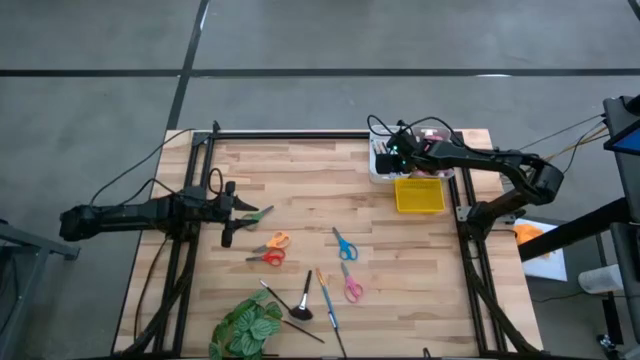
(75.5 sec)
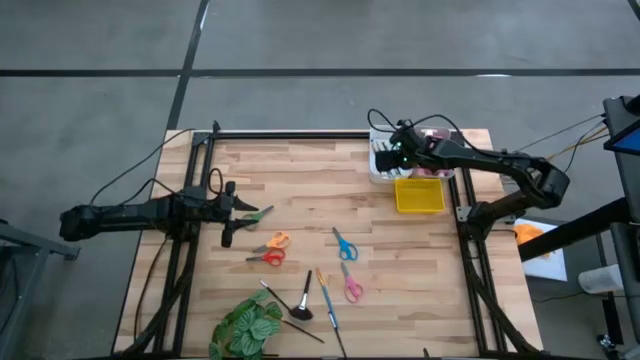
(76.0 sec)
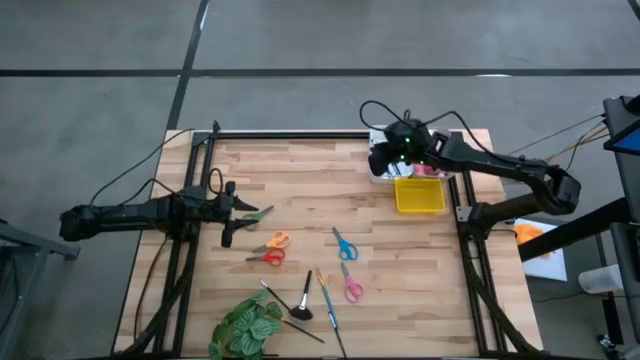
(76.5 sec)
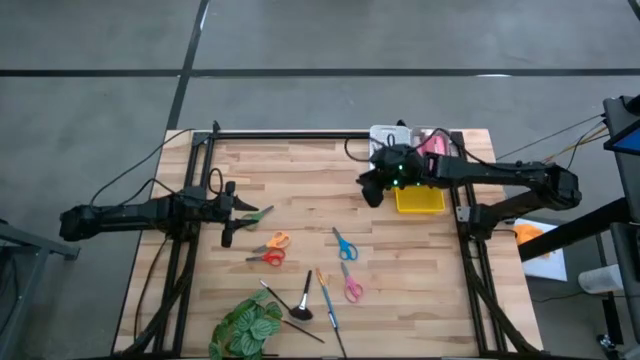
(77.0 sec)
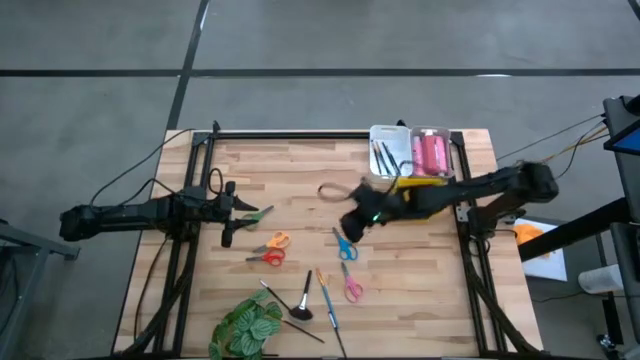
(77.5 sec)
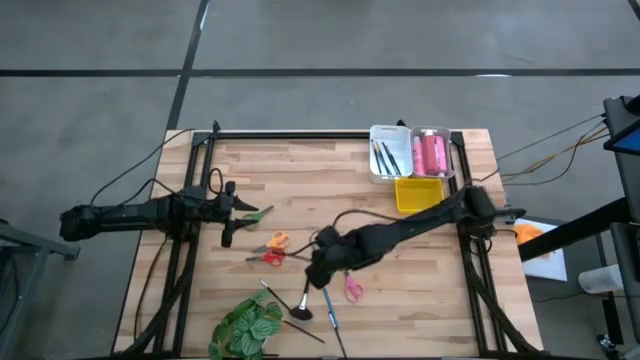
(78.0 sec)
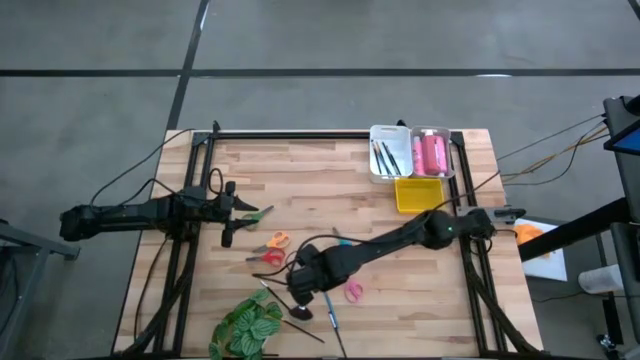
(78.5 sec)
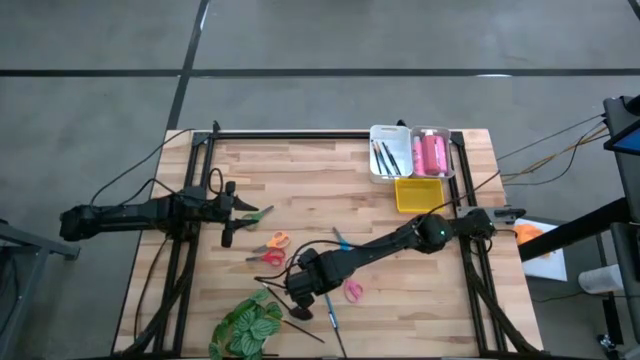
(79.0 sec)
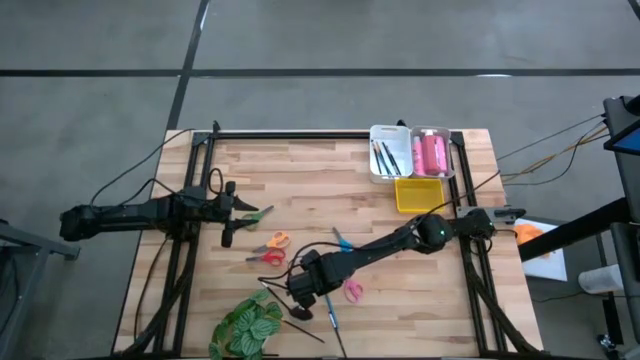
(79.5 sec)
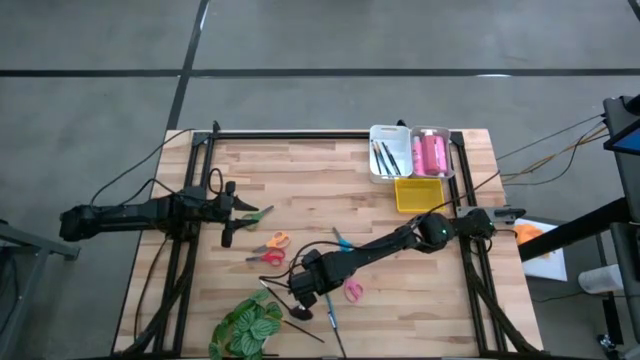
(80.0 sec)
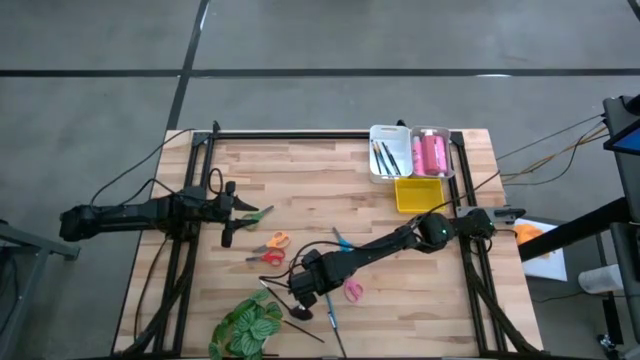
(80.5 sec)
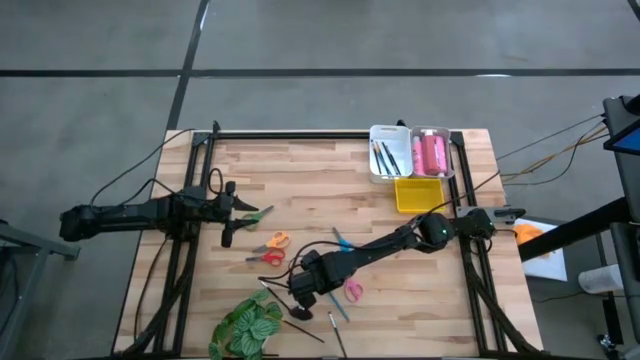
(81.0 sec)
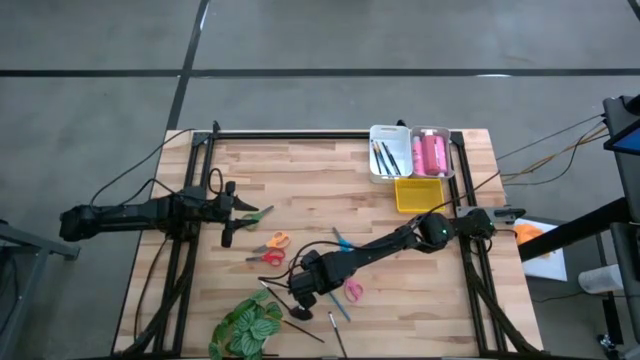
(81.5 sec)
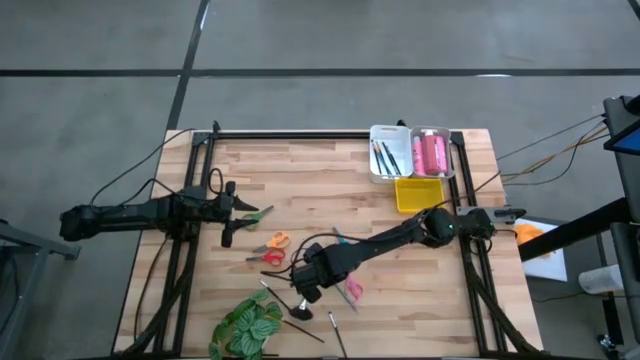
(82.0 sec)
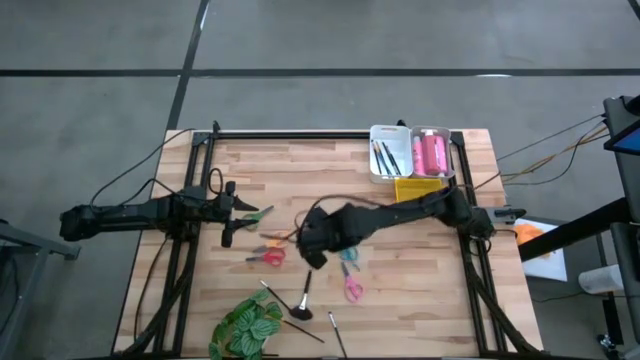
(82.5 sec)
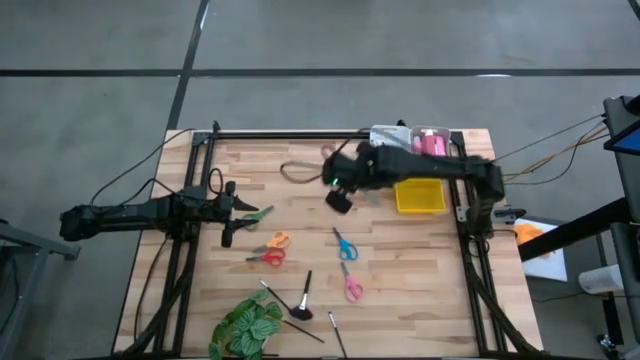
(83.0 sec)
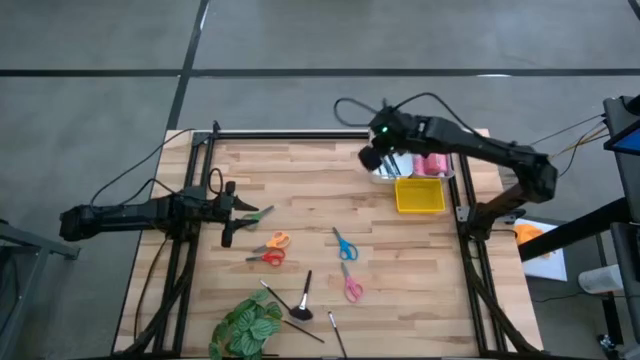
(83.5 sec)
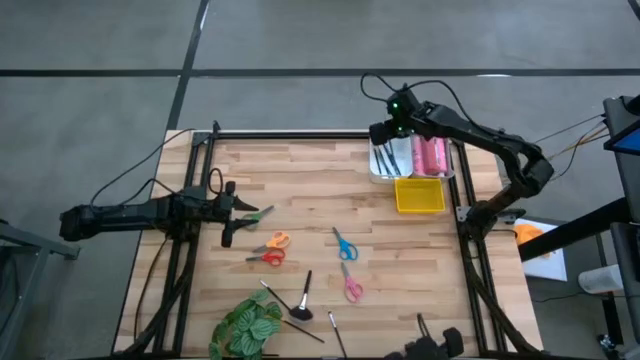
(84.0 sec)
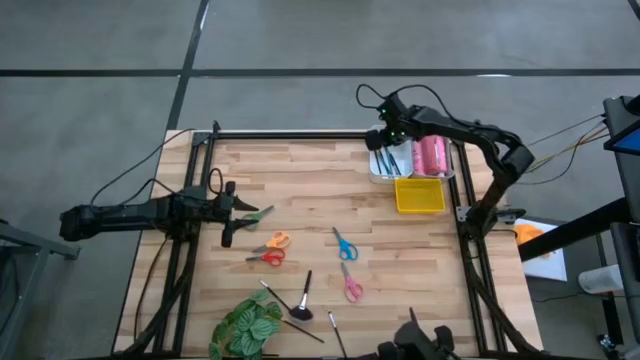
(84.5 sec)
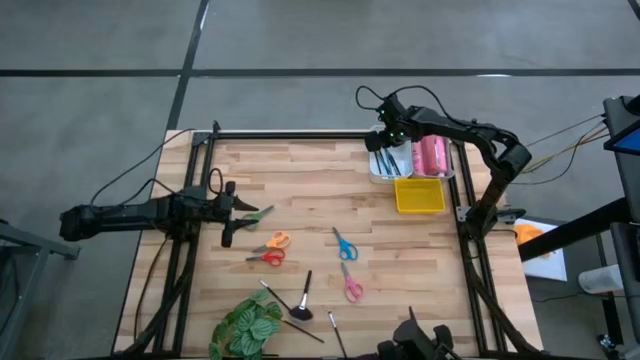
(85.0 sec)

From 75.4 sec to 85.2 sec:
Task: Pick & Place Paint Supplies
Put the blue paint brush into the white bin

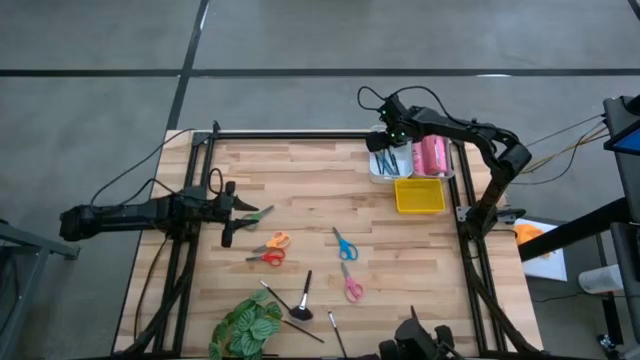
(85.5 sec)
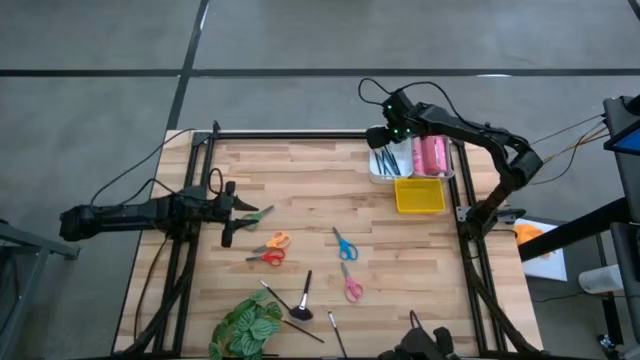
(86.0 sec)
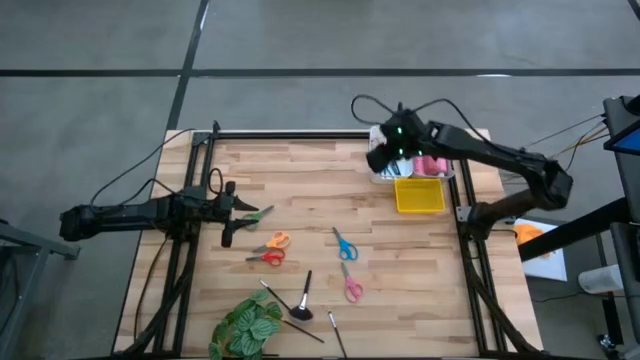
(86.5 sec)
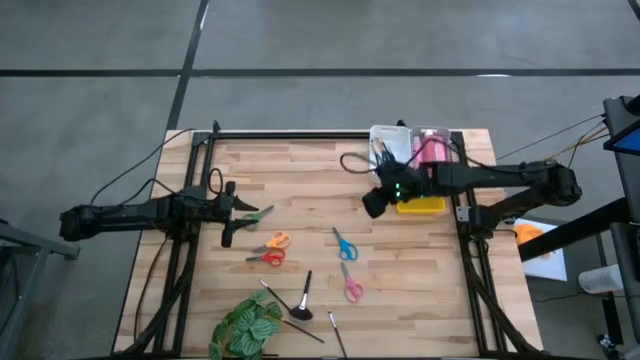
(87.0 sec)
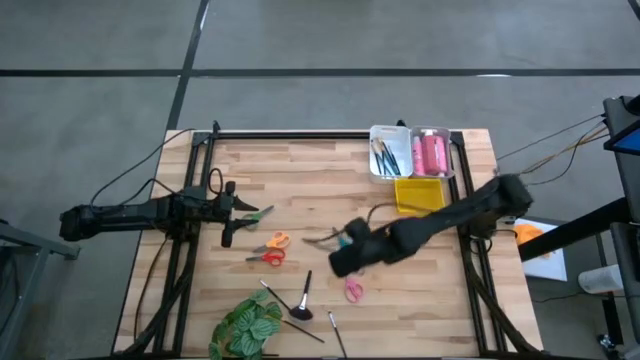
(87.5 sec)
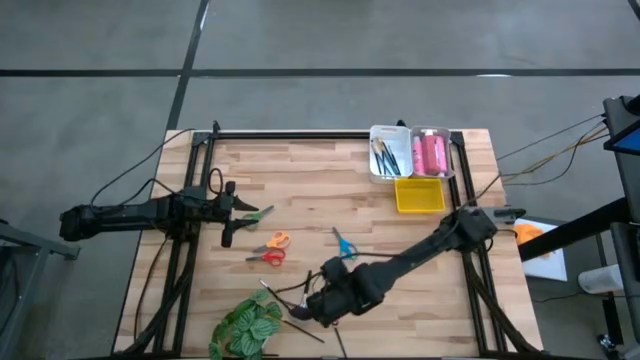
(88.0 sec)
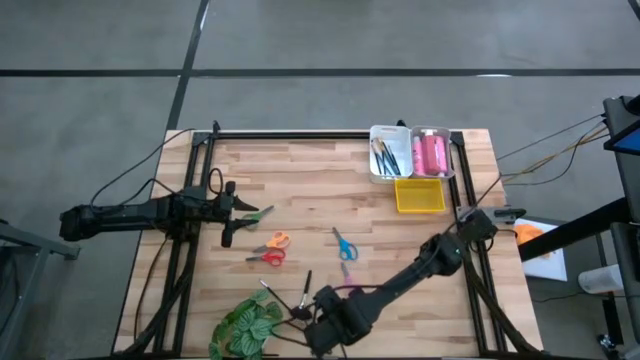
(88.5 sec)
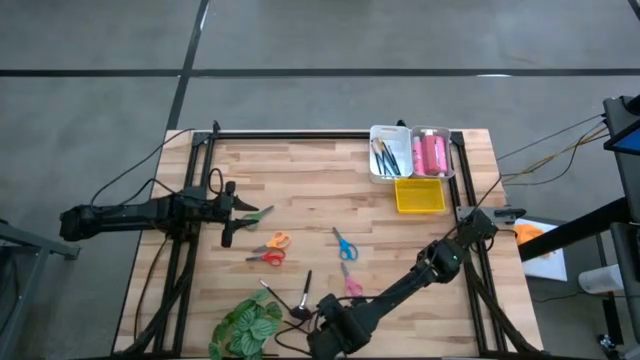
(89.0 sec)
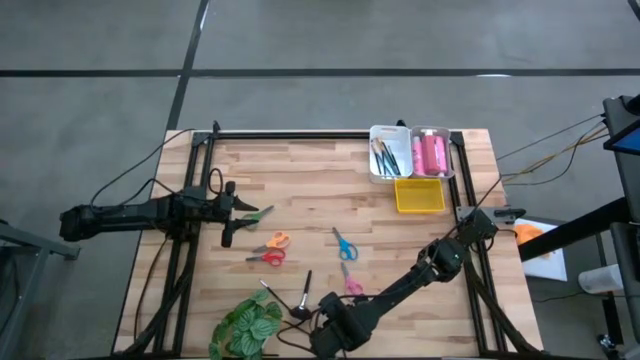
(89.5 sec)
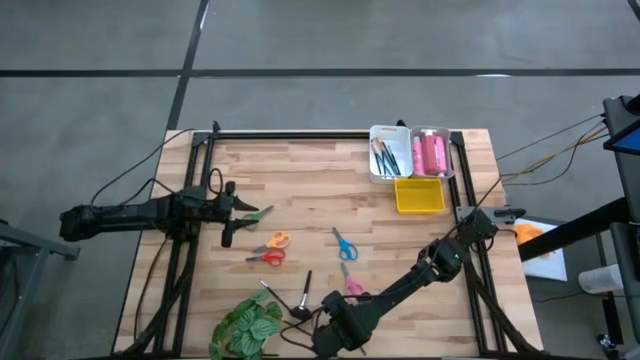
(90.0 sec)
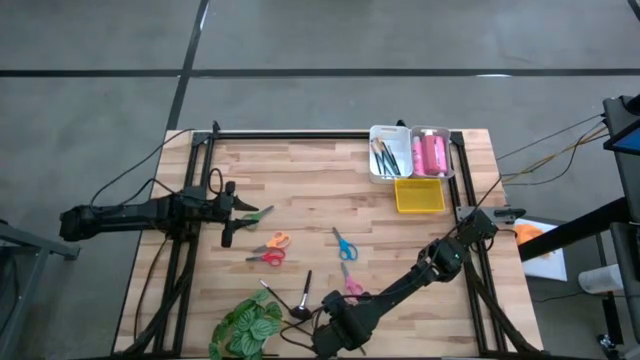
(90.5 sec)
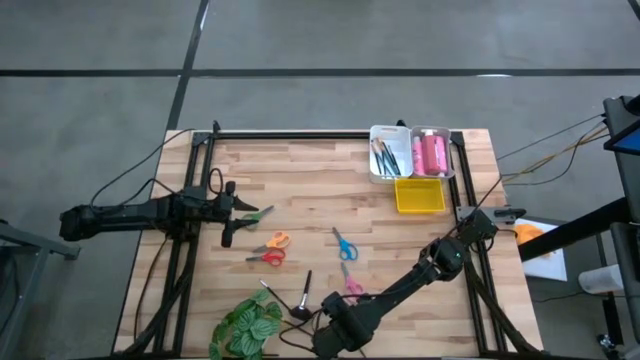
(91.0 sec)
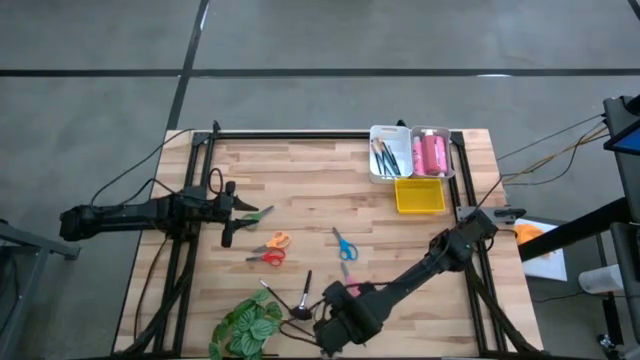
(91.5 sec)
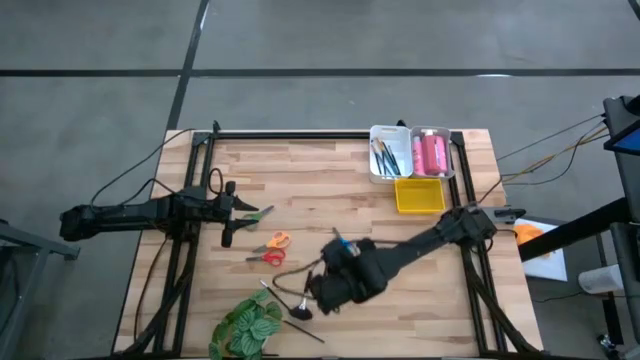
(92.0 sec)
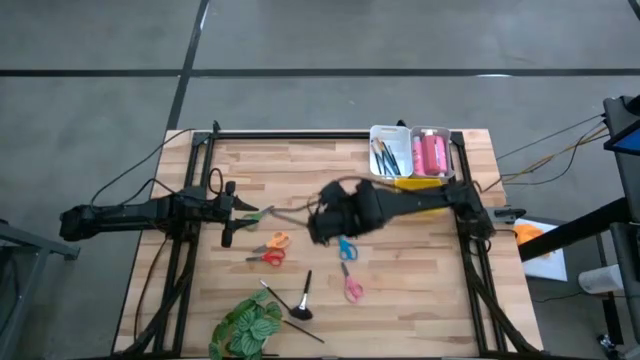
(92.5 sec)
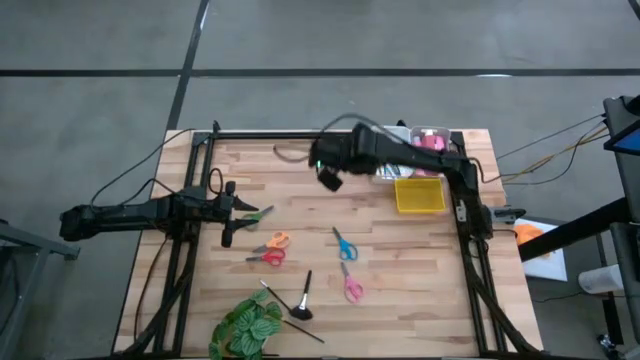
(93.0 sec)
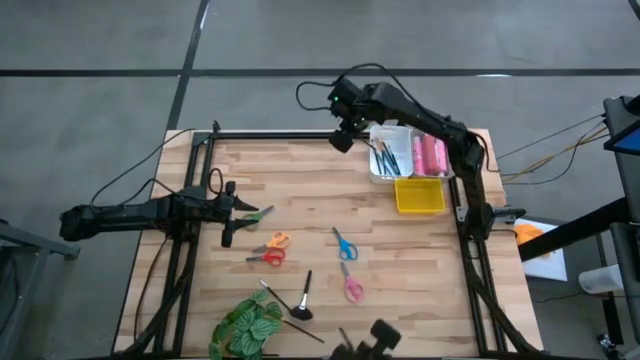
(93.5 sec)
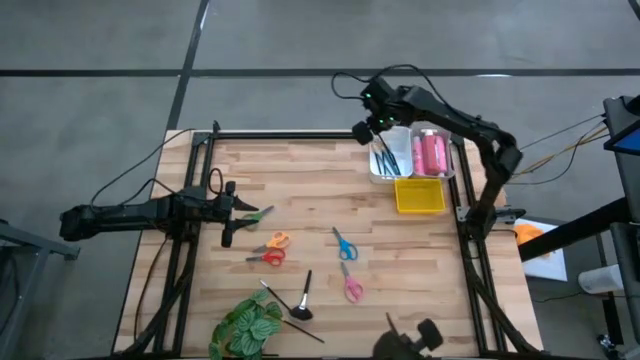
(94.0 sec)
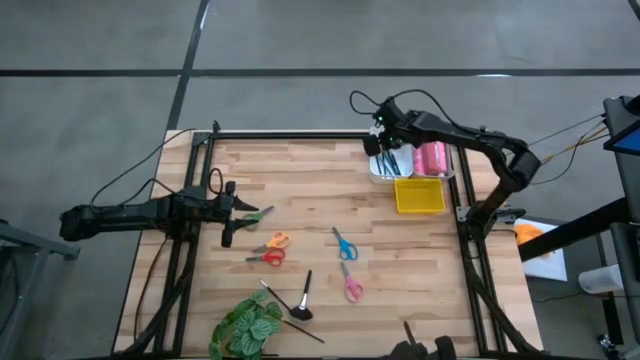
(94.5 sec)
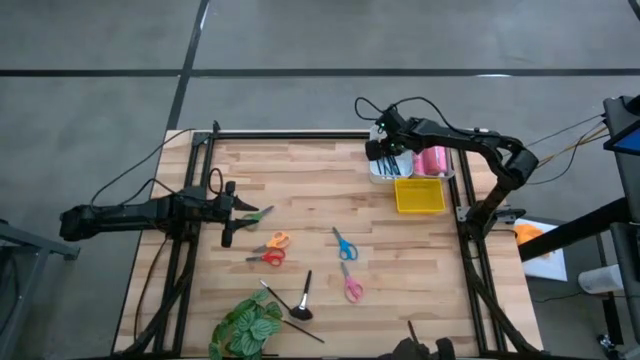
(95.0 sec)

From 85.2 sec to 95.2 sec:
Put the black paint brush into the white bin
